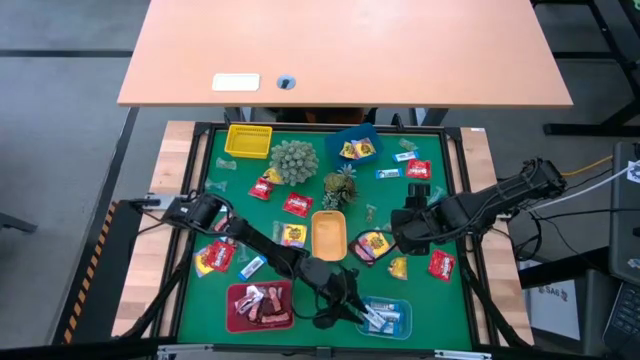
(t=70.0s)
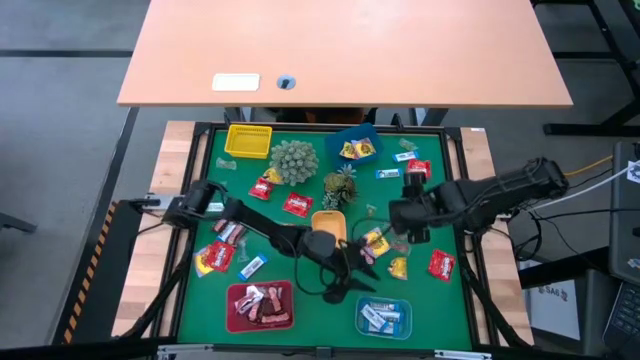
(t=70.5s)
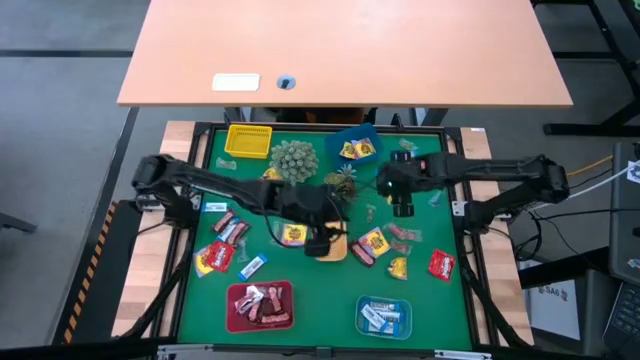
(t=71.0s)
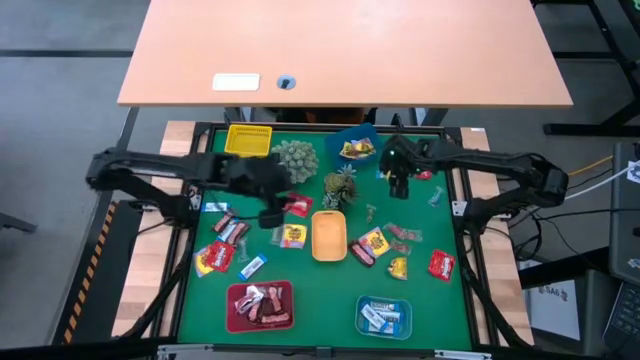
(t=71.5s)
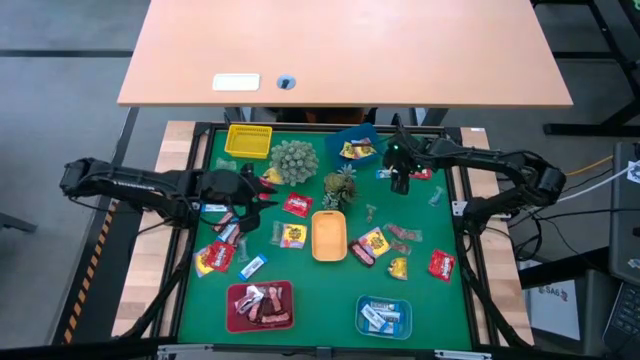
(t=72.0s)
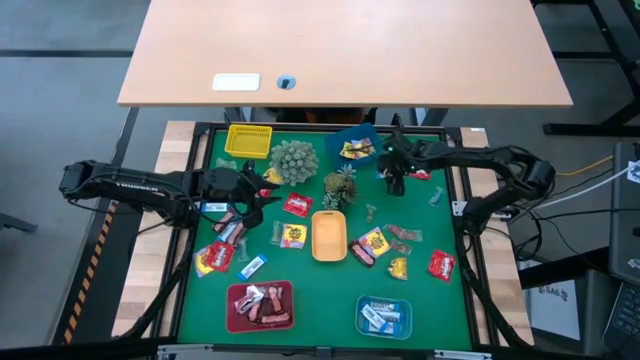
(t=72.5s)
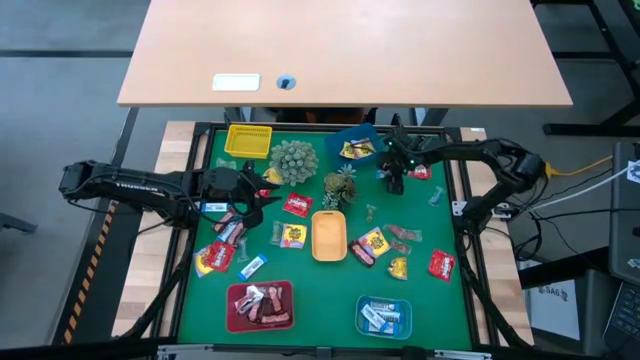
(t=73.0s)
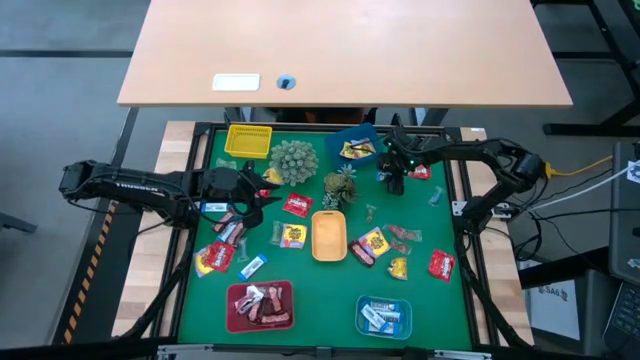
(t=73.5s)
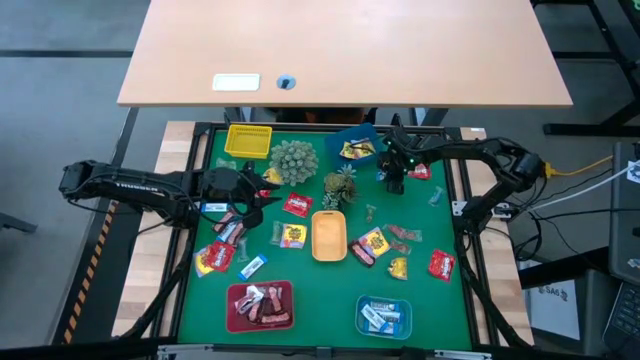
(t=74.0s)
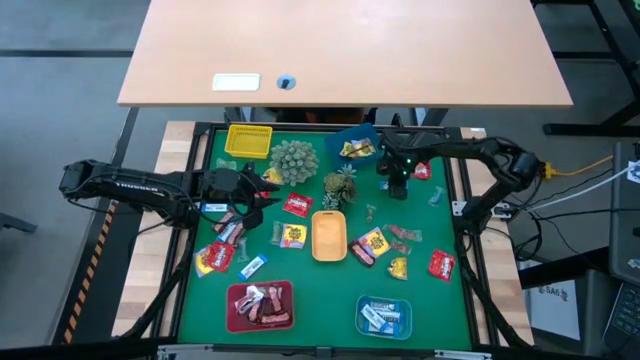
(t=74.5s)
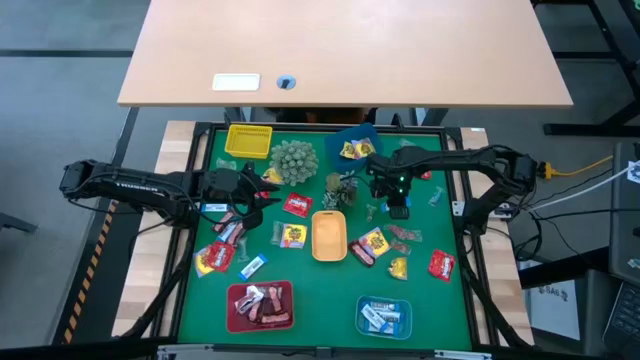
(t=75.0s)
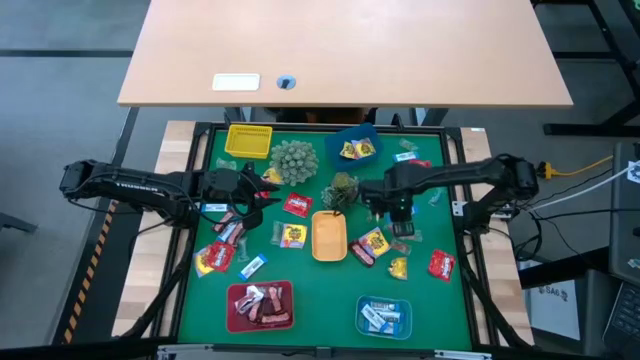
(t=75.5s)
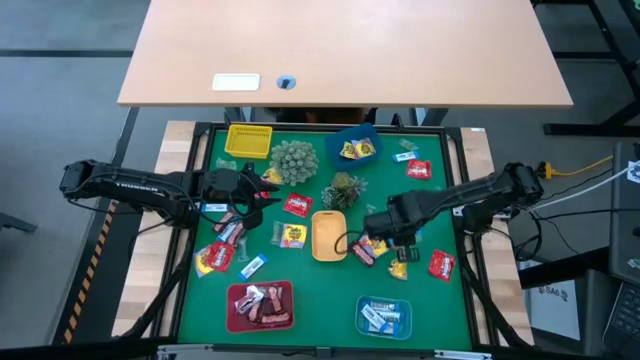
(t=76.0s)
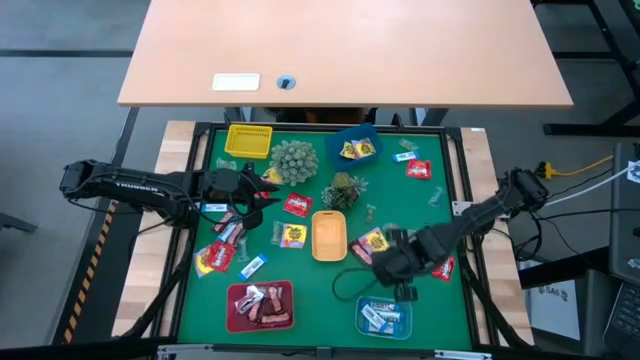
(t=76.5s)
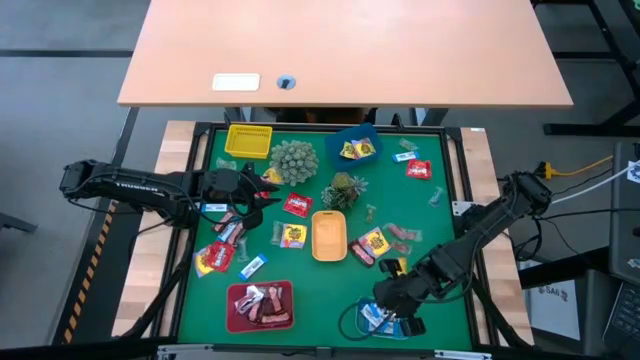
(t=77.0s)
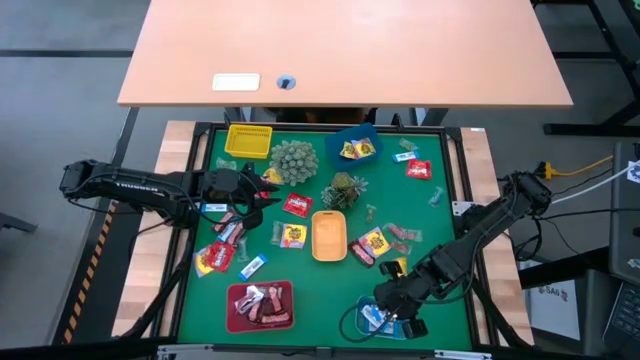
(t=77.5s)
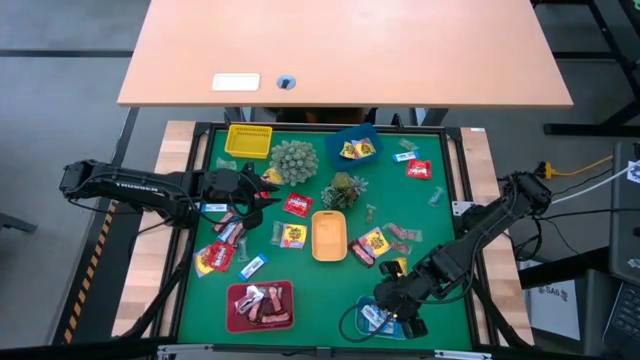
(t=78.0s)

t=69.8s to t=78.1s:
Task: Sort candy
Put the blue chocolate bar into the light blue bin

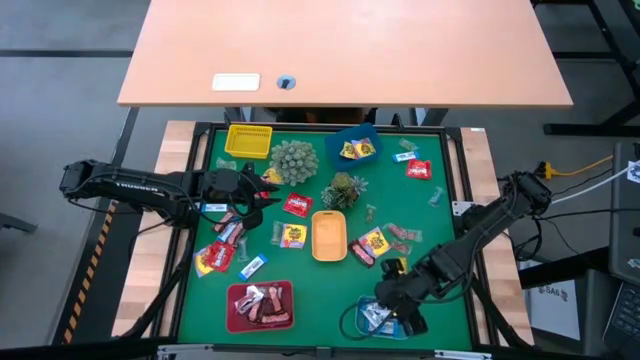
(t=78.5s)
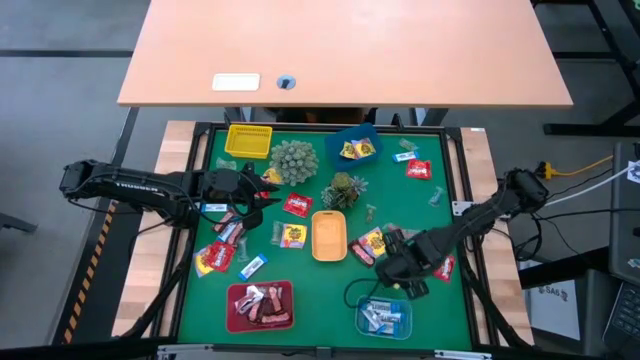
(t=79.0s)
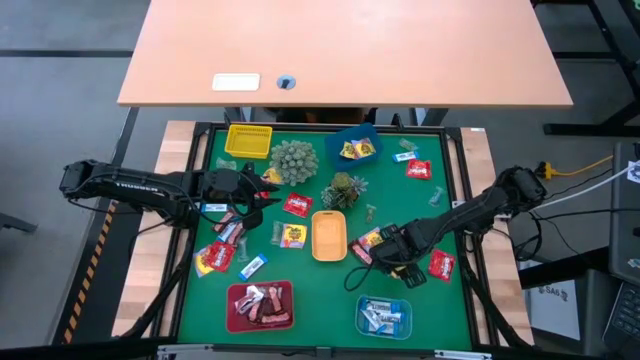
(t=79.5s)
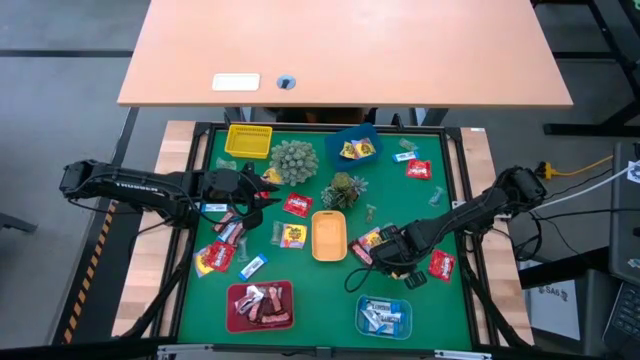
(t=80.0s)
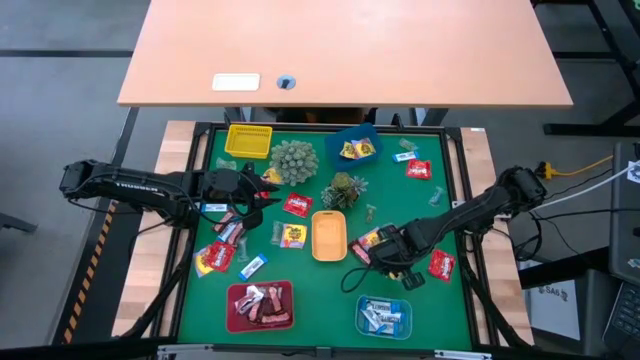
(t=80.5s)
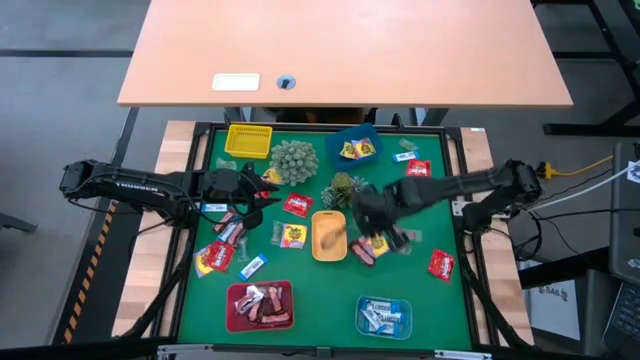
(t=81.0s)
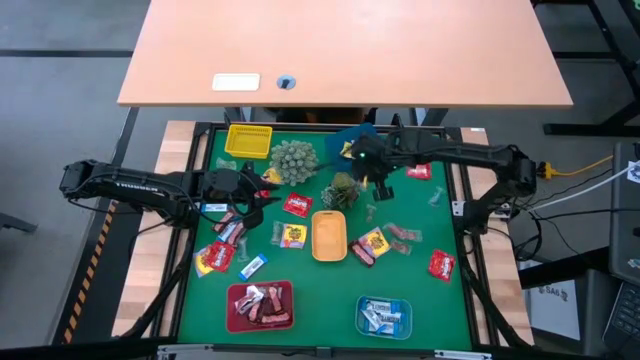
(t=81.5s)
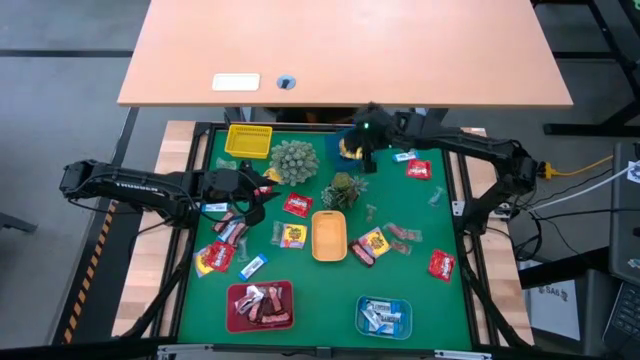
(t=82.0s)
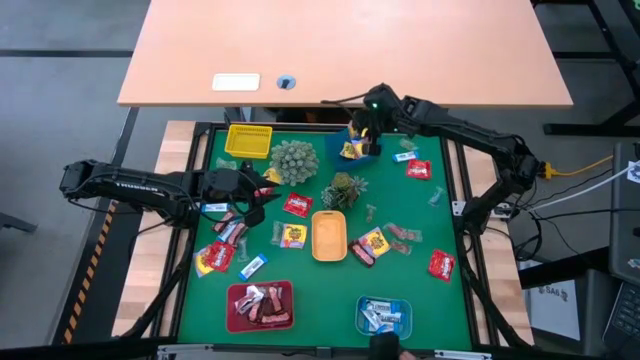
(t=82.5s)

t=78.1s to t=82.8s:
Put the yellow candy into the blue bin

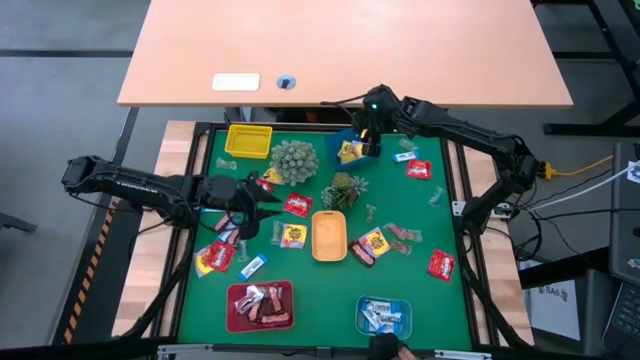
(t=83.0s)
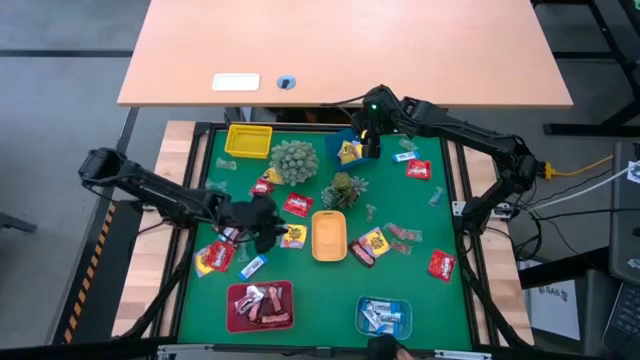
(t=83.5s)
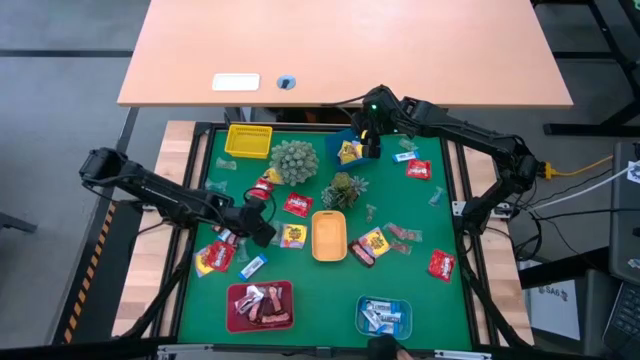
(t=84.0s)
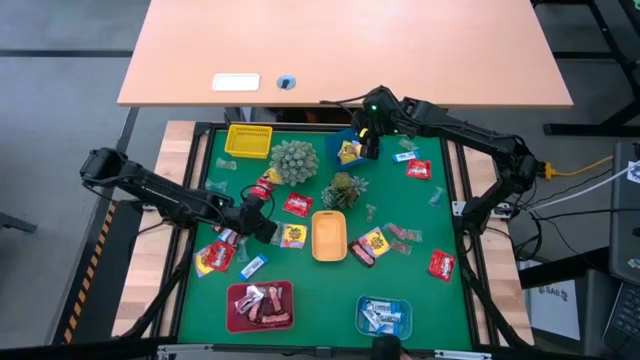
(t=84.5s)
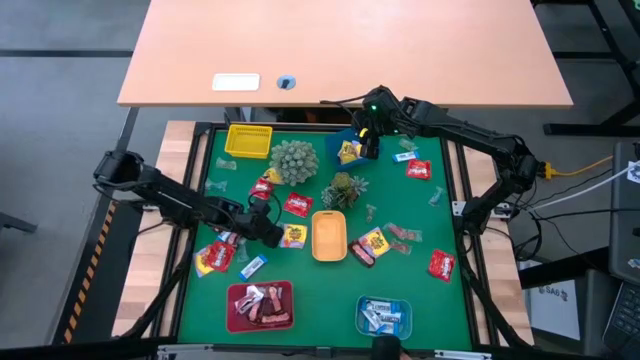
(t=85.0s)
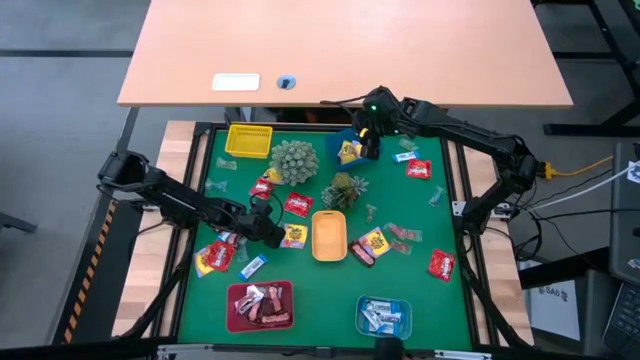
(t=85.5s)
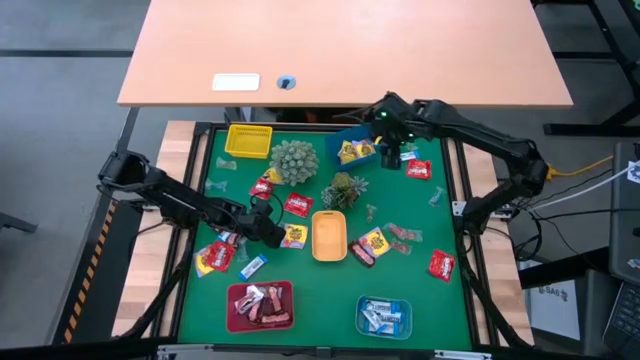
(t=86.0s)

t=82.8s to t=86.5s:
Put the green gummy into the yellow bin

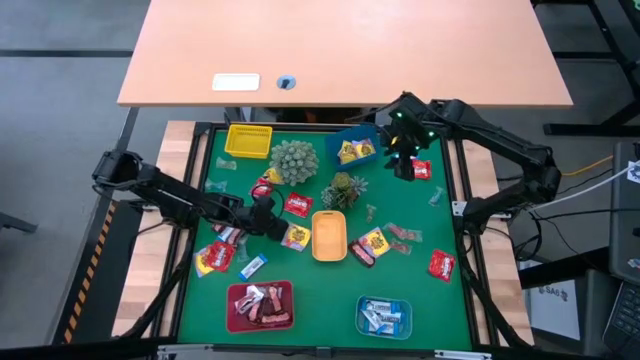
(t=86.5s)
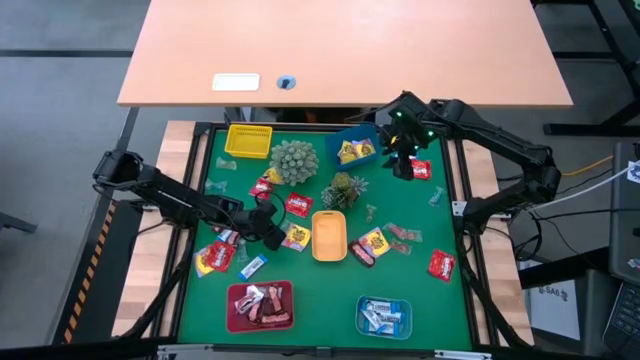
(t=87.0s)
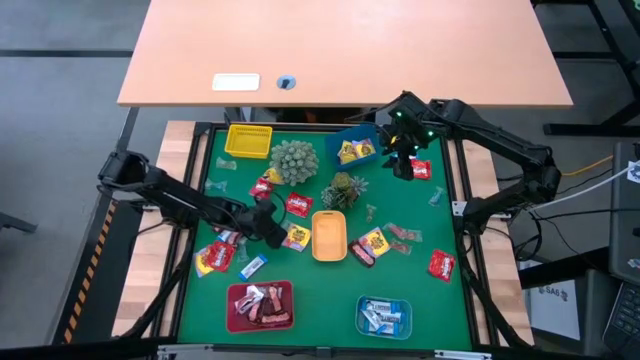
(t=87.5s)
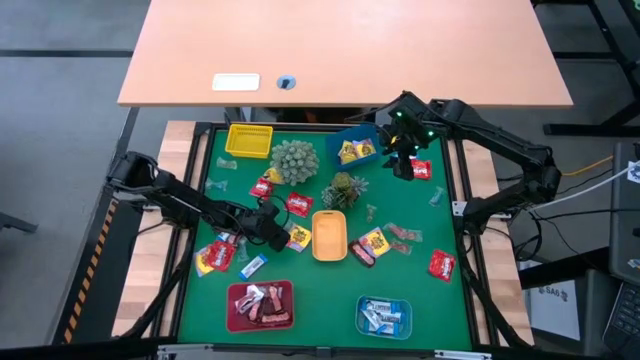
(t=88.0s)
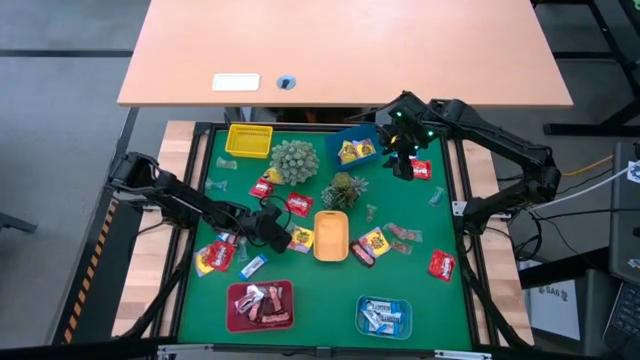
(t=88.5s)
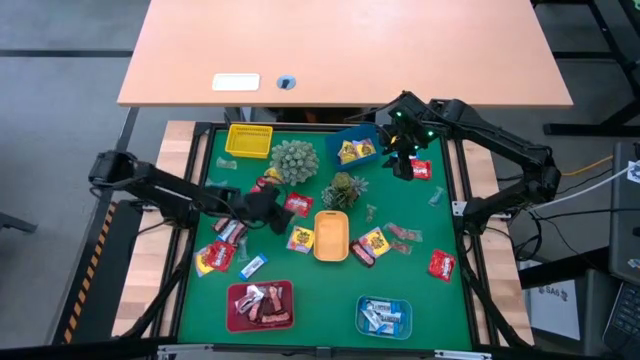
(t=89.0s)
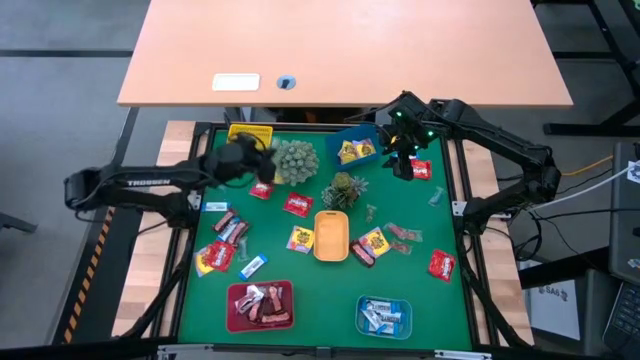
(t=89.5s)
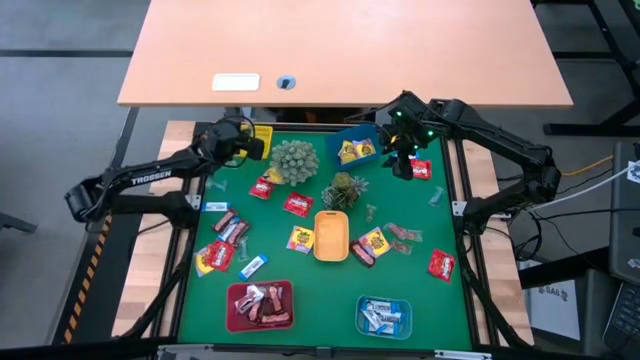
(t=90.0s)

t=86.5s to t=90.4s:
Put the green gummy into the yellow bin

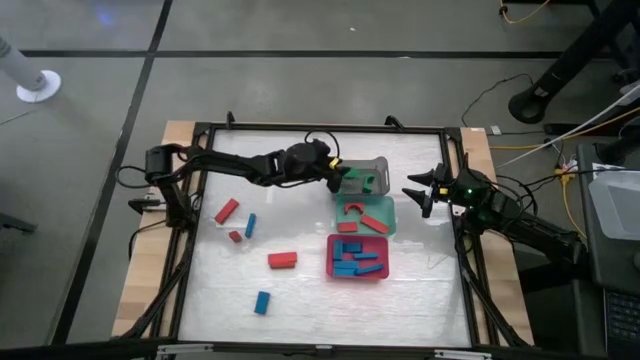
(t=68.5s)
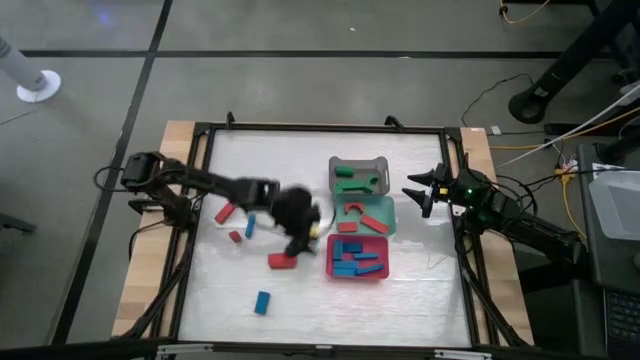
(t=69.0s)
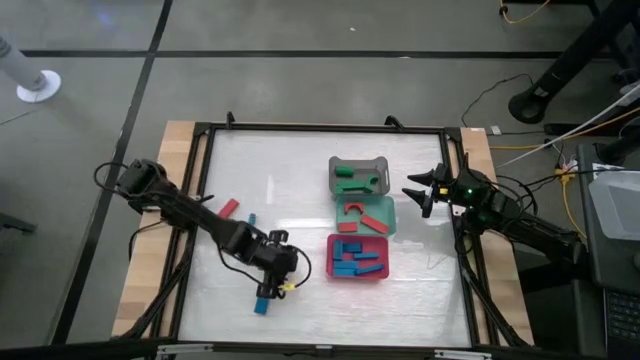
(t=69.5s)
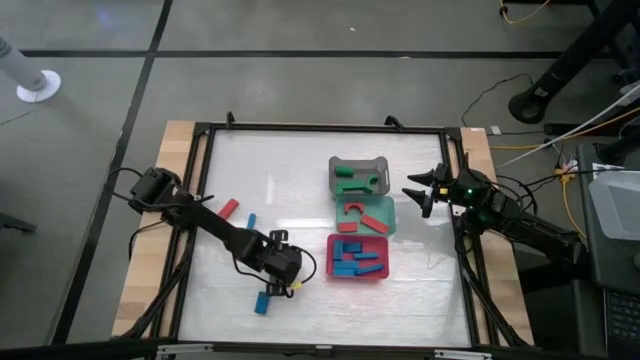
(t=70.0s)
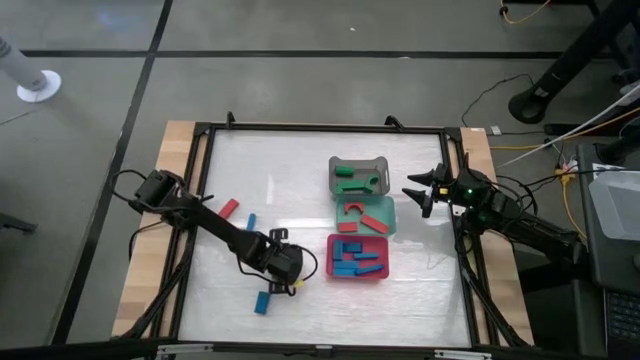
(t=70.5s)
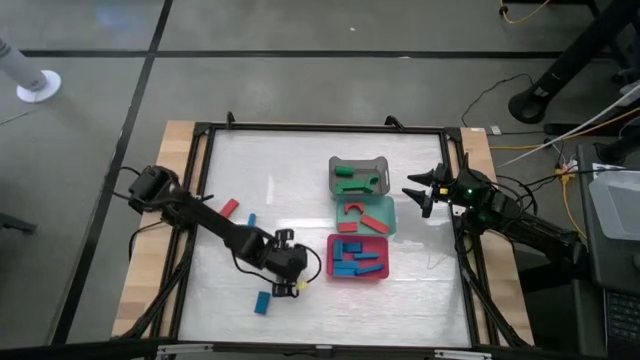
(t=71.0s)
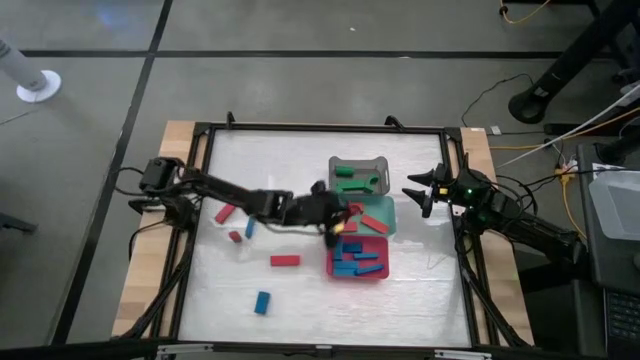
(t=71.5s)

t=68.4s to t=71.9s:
Task: Sort blocks
Put the red block into the green bin
